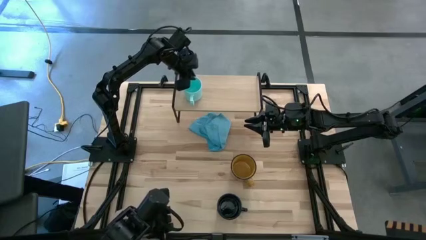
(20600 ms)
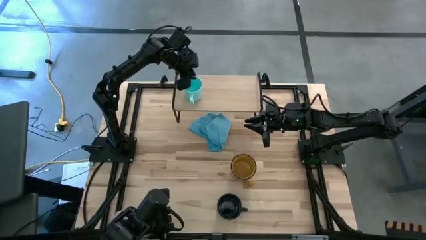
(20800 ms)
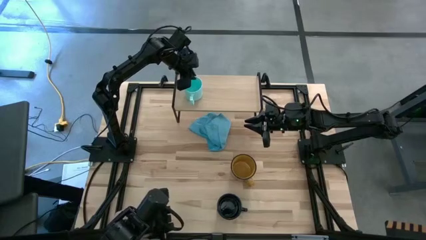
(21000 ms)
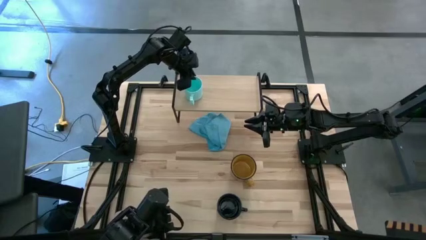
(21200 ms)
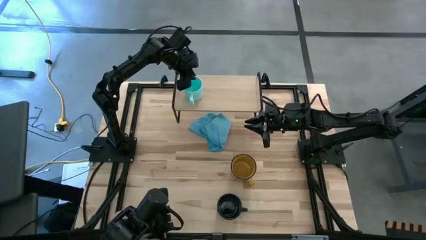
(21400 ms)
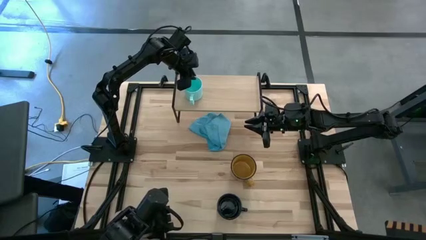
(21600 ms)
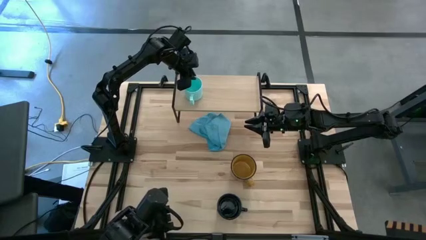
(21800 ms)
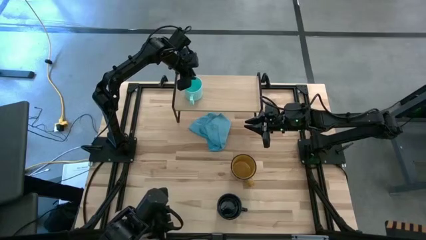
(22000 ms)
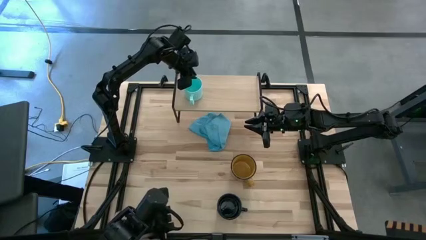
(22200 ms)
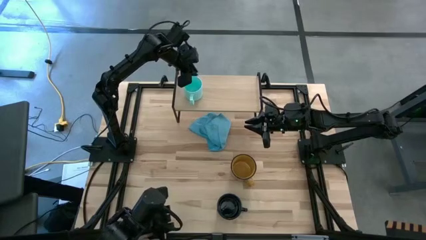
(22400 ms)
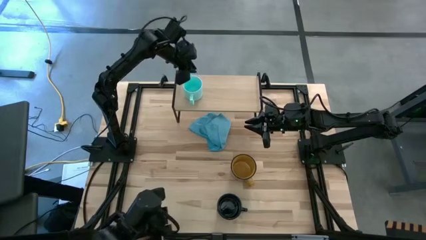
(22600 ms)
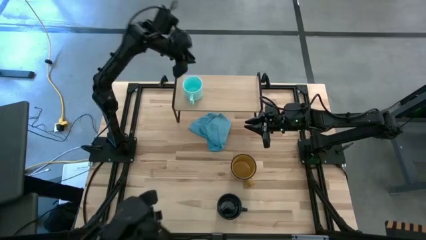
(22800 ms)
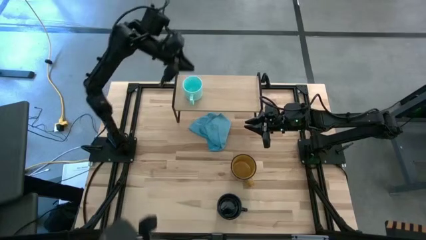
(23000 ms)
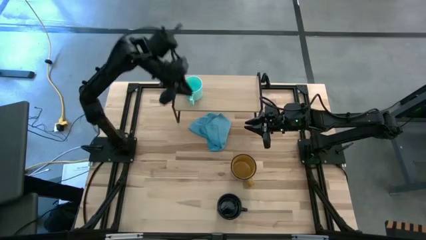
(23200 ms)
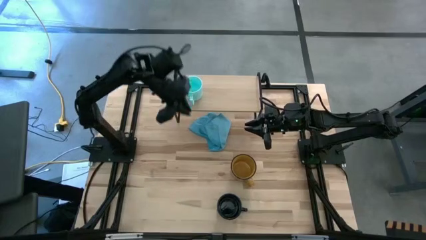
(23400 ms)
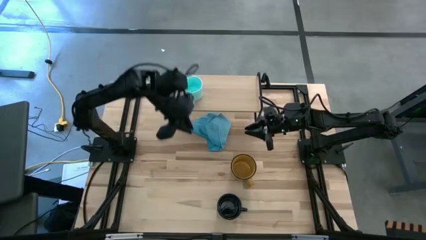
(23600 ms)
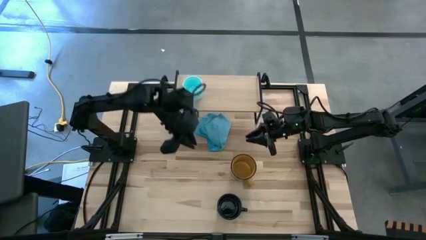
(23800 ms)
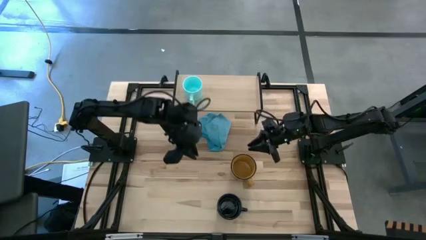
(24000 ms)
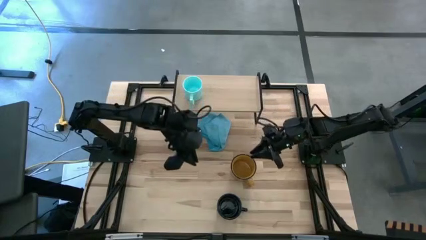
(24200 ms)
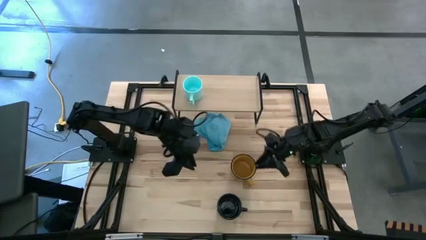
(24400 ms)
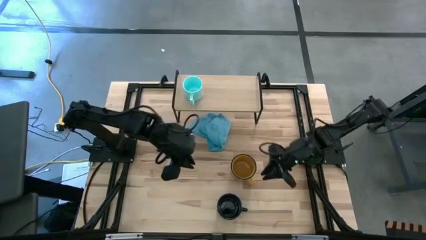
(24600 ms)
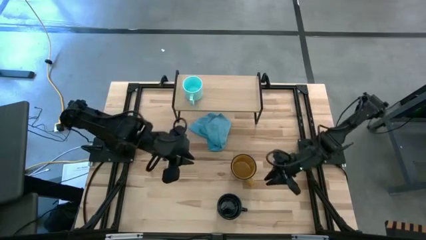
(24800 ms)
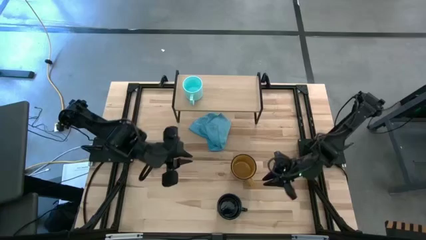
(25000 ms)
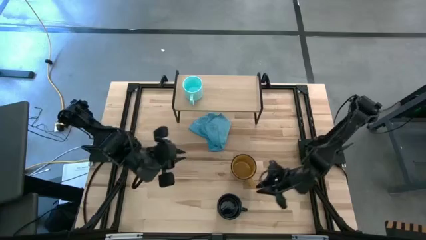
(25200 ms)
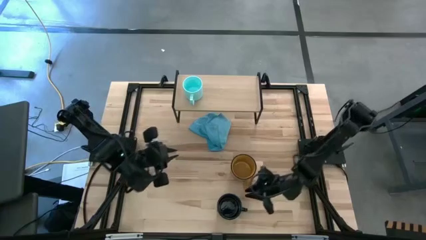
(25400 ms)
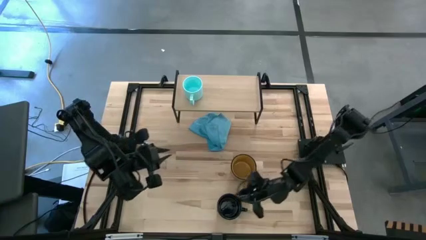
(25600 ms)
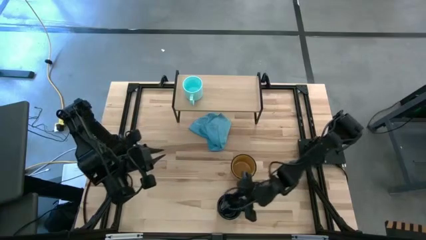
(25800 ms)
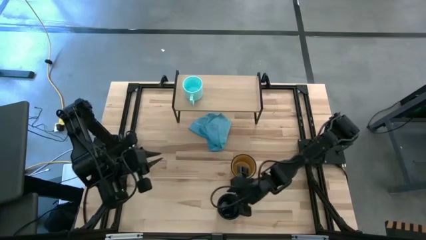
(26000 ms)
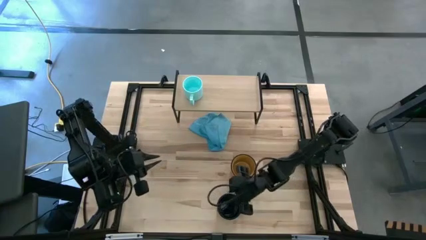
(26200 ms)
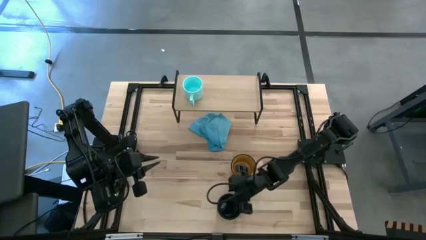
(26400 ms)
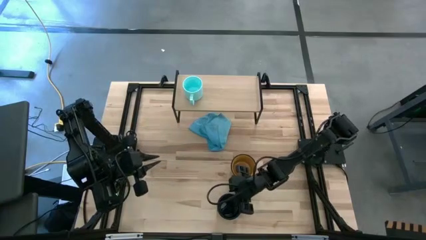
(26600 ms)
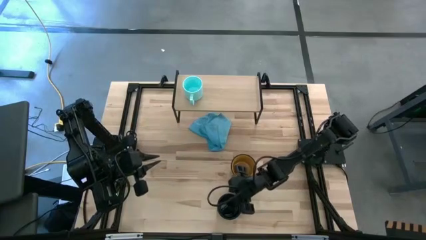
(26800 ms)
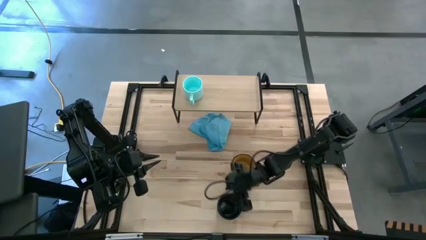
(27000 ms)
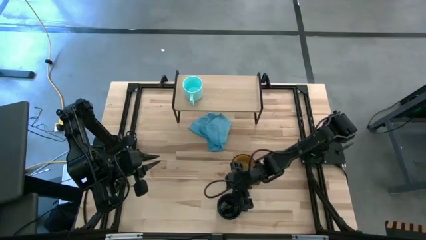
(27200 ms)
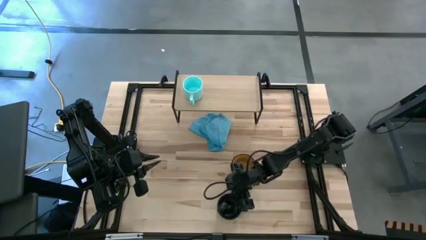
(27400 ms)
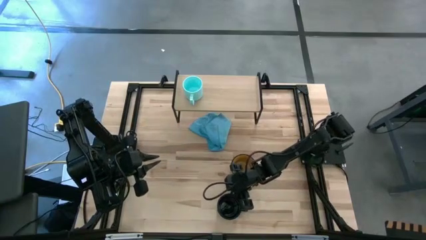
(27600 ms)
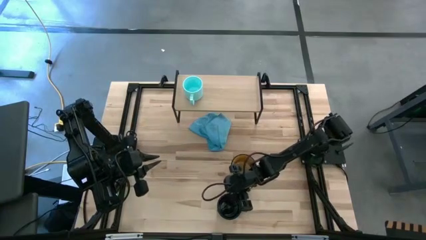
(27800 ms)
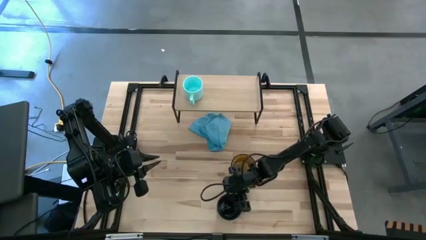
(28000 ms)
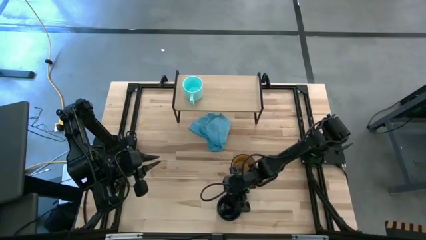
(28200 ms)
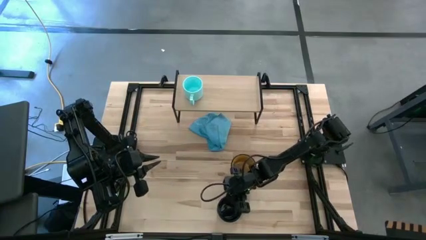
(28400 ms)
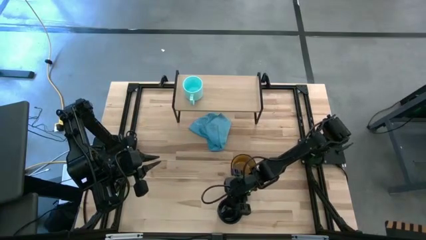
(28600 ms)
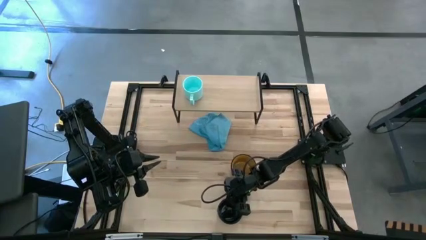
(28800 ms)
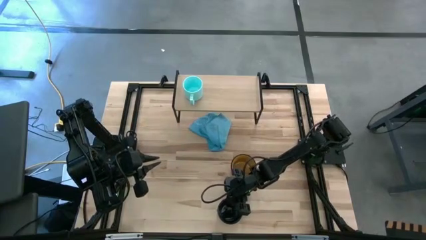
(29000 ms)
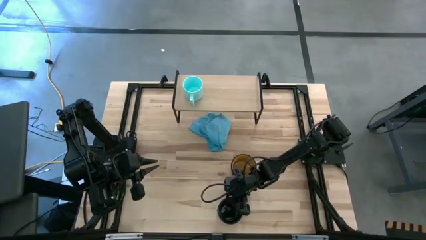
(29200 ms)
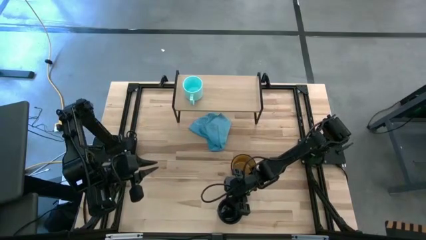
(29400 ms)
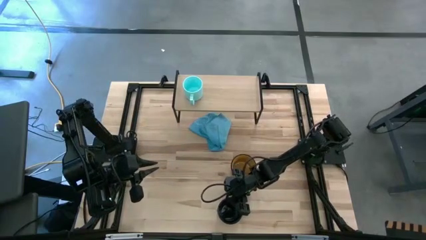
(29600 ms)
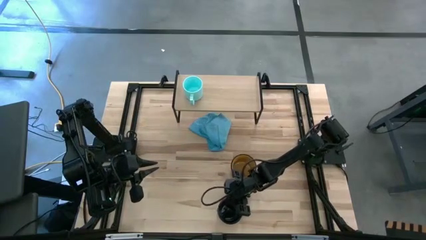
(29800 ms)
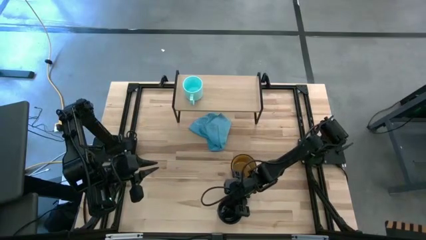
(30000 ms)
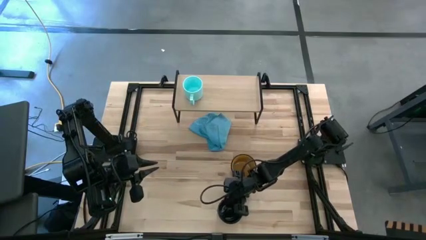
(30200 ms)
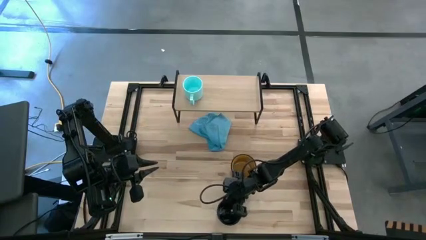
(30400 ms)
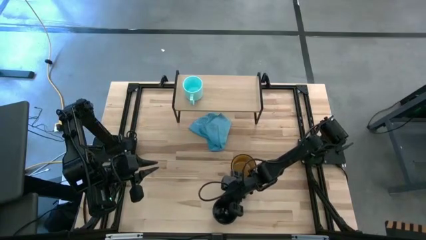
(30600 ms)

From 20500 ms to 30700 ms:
Task: Stack small to large cups/mugs on shelf
Put the dark blue cup on the shelf

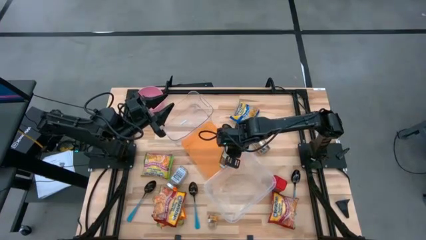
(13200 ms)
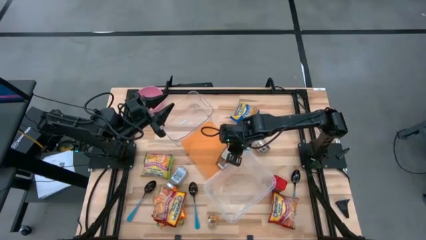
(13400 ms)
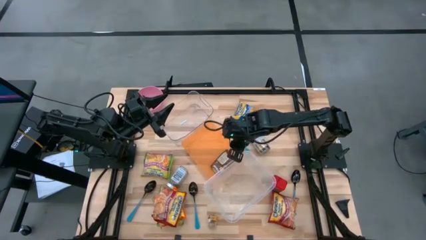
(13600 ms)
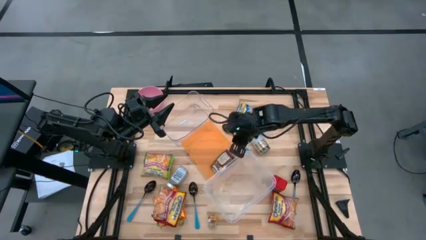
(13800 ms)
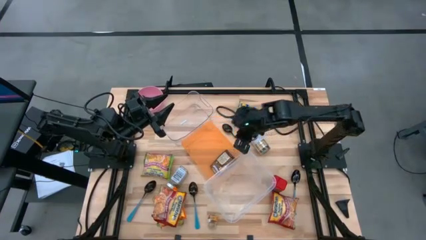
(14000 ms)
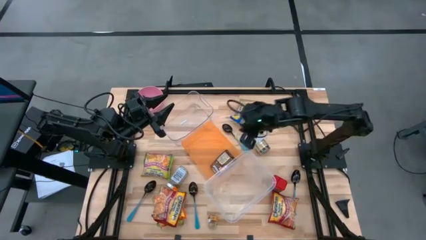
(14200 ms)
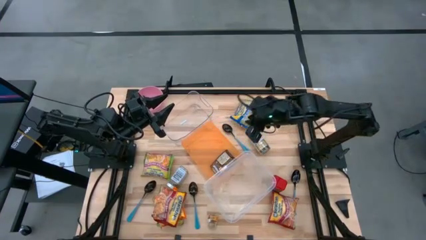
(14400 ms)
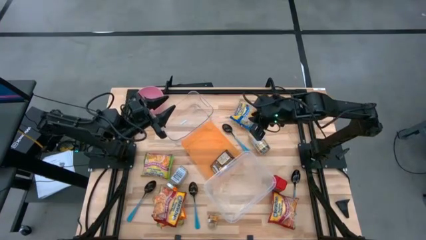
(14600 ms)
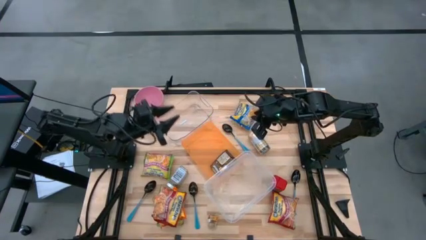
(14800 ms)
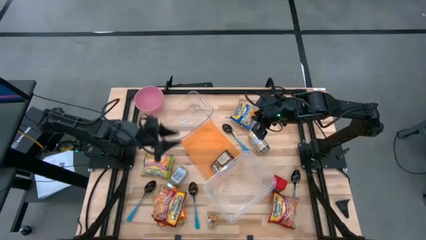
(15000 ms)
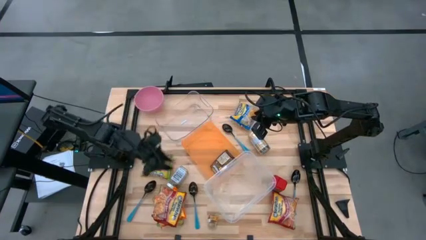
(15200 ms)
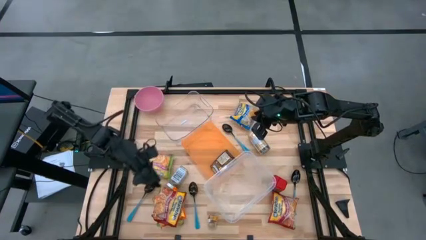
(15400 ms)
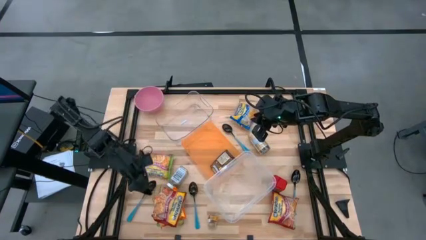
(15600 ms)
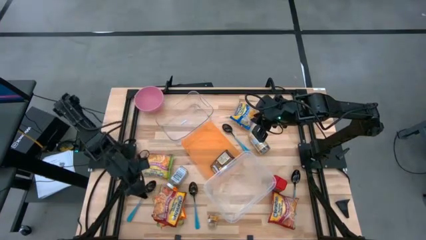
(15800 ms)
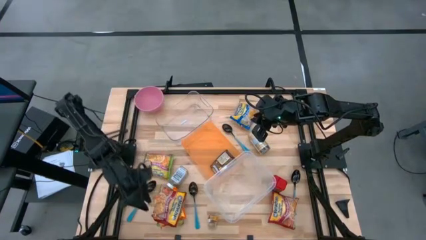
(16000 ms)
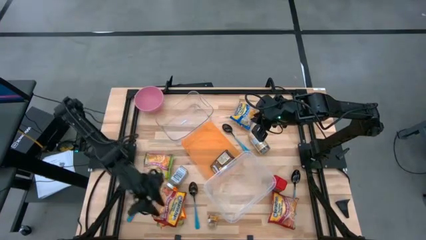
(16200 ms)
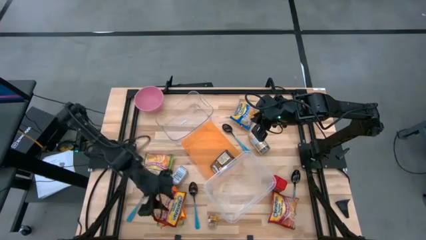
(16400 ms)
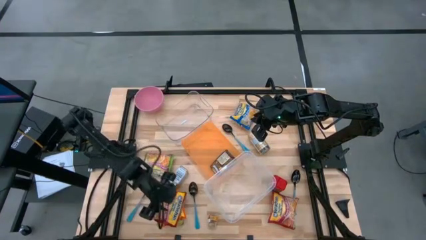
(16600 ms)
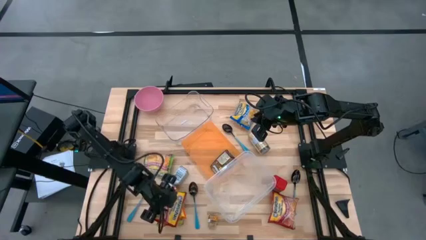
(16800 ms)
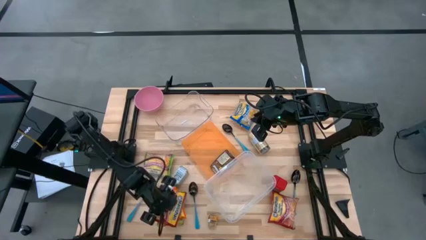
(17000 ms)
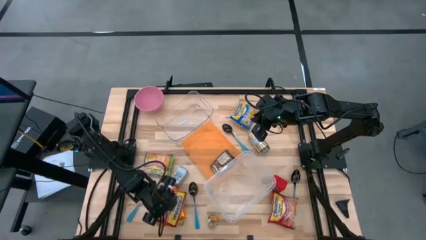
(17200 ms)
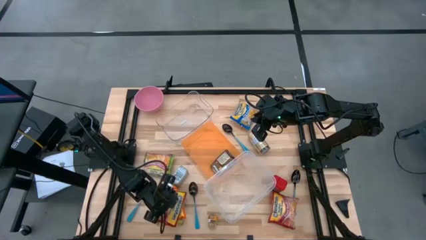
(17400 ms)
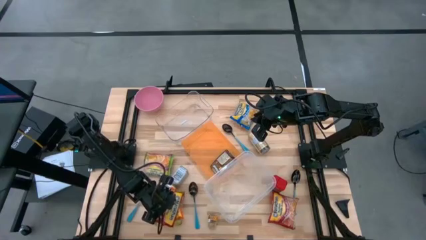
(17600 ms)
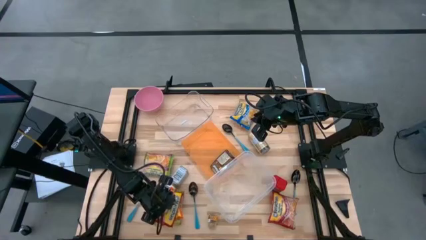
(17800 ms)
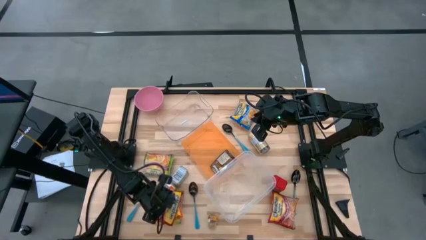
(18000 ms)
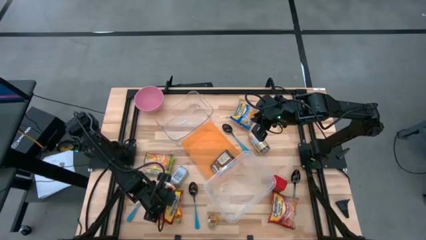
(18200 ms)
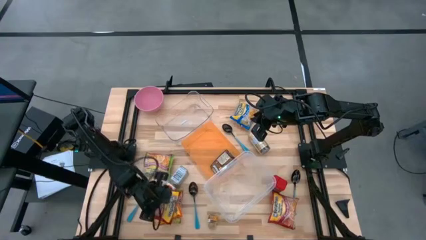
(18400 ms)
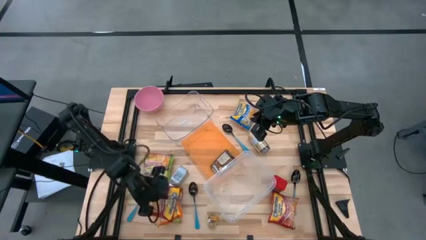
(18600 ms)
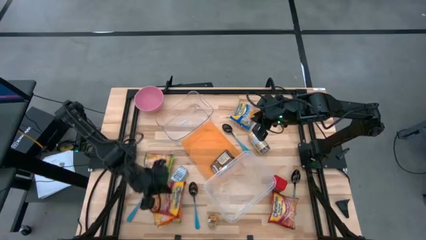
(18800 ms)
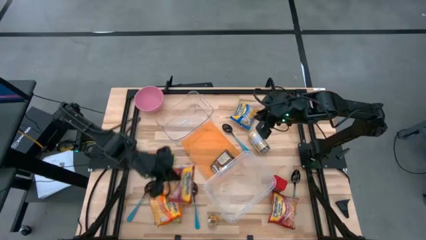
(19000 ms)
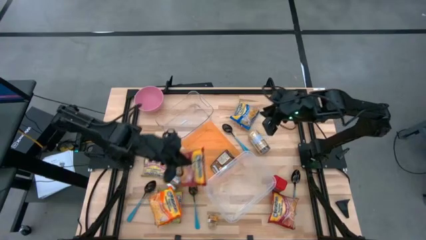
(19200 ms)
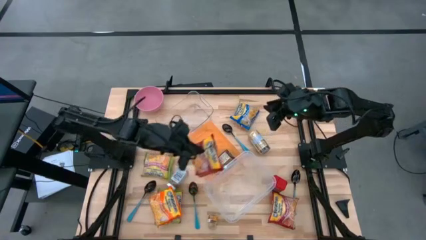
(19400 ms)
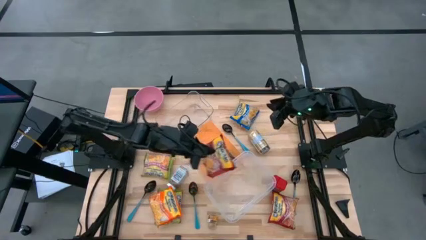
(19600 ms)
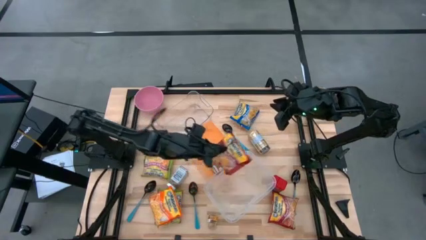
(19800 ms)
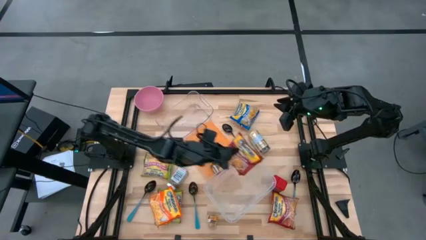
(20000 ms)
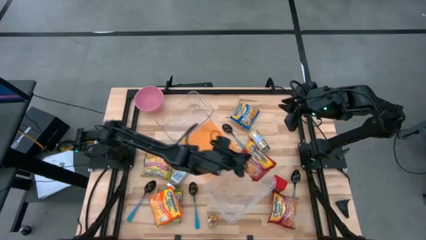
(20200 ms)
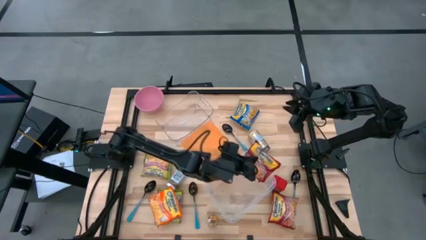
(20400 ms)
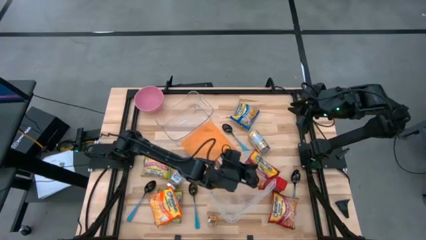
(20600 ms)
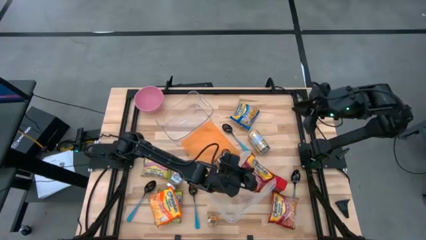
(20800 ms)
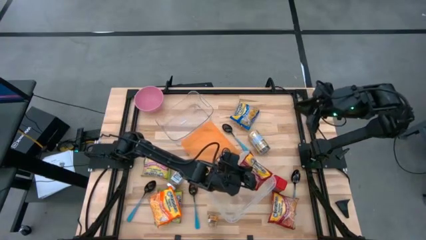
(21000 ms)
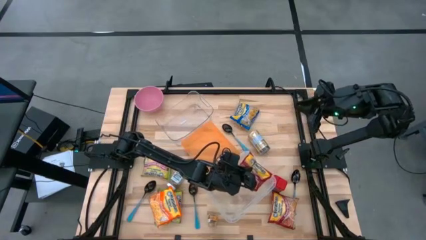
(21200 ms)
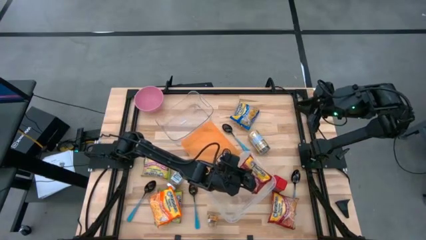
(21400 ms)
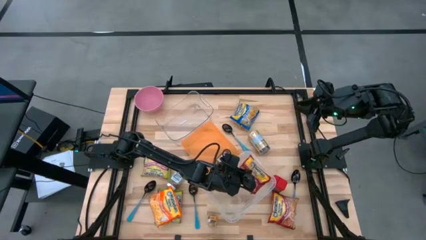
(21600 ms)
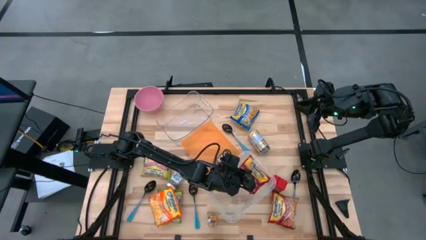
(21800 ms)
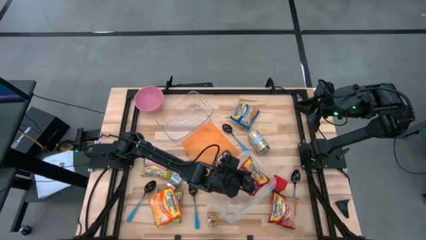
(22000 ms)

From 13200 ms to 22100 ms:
Task: Pick & Place Food Item
Put the red noodle pack into the bottom transparent bin
